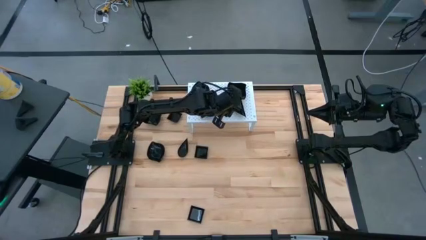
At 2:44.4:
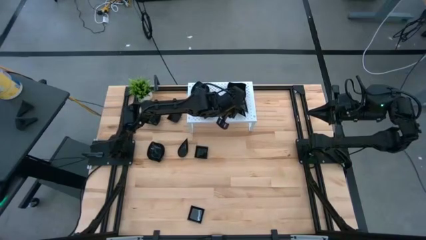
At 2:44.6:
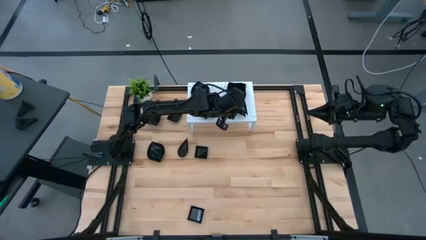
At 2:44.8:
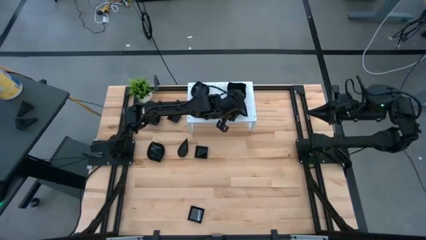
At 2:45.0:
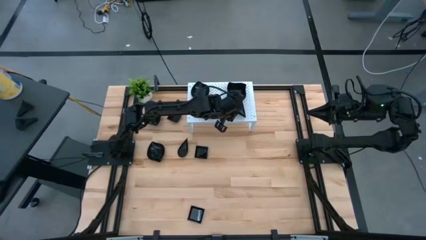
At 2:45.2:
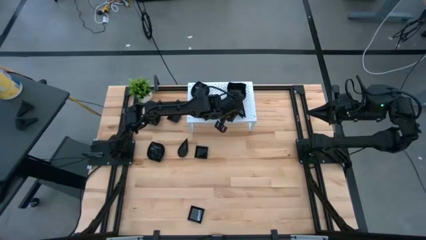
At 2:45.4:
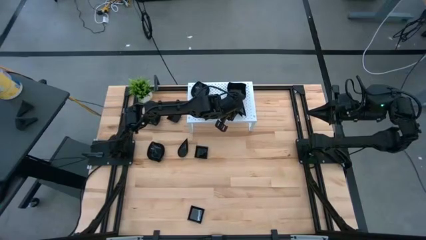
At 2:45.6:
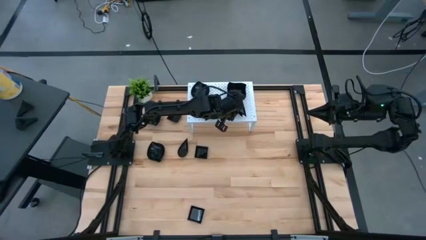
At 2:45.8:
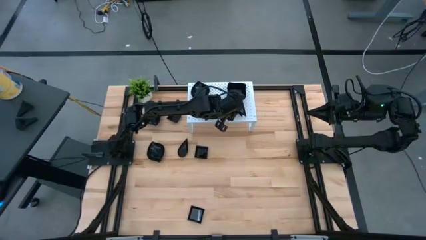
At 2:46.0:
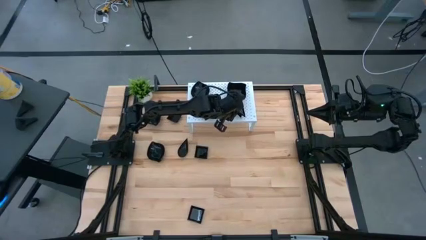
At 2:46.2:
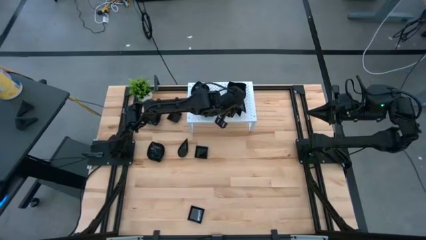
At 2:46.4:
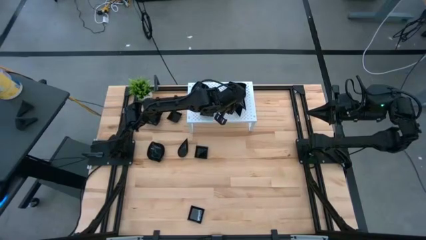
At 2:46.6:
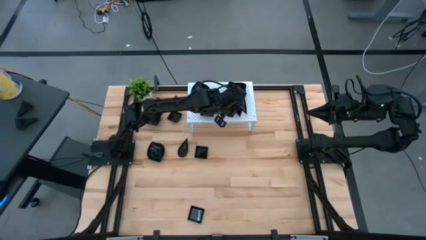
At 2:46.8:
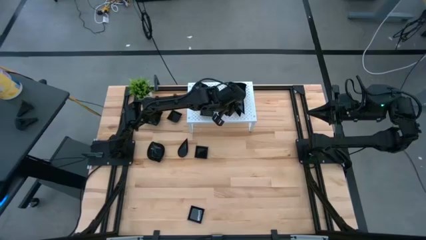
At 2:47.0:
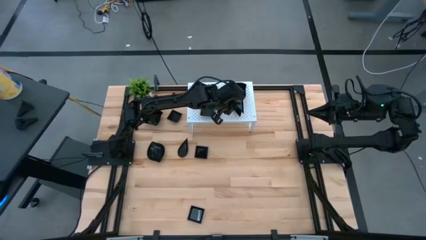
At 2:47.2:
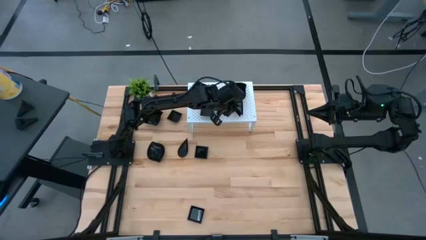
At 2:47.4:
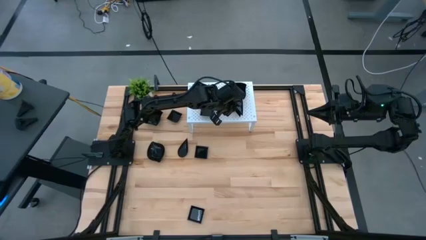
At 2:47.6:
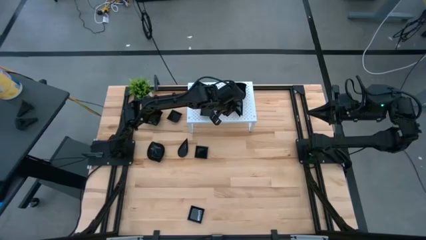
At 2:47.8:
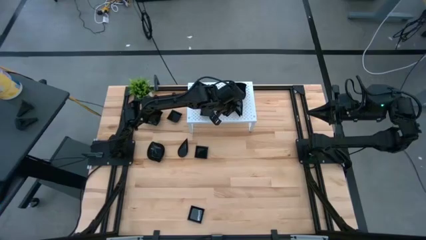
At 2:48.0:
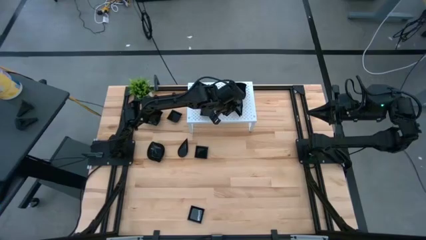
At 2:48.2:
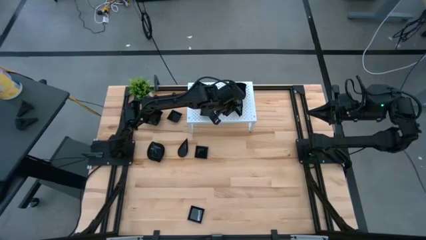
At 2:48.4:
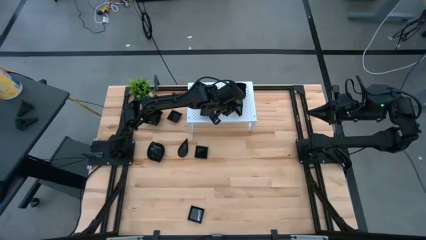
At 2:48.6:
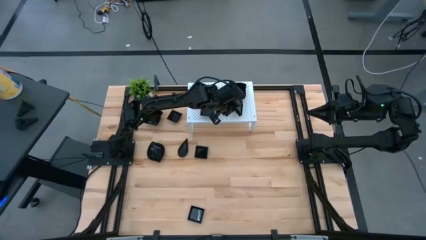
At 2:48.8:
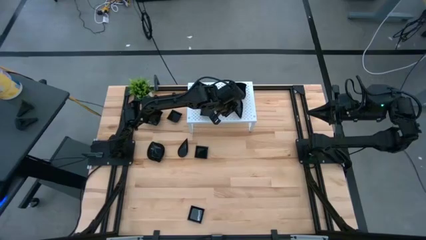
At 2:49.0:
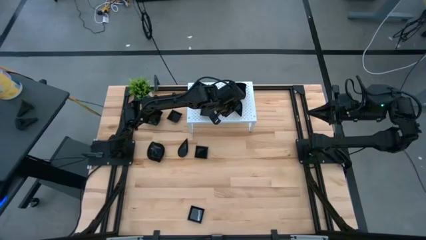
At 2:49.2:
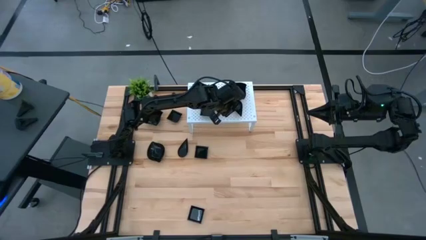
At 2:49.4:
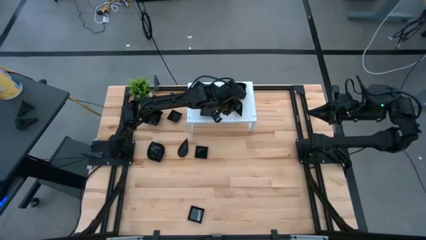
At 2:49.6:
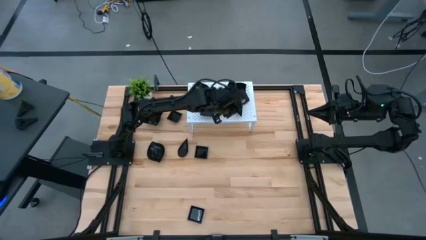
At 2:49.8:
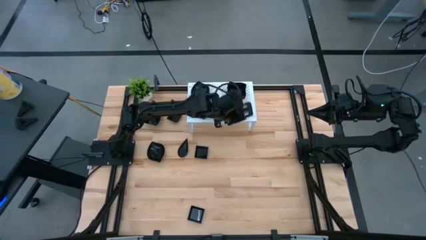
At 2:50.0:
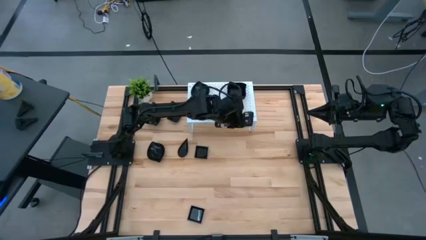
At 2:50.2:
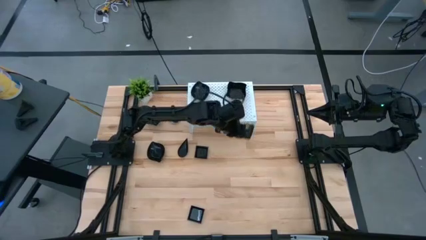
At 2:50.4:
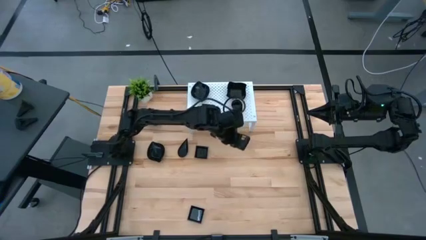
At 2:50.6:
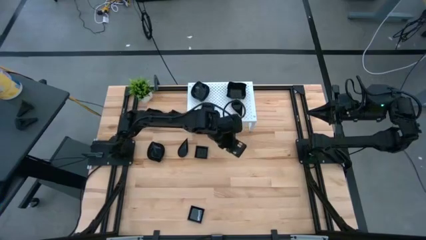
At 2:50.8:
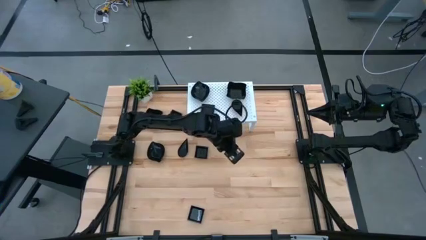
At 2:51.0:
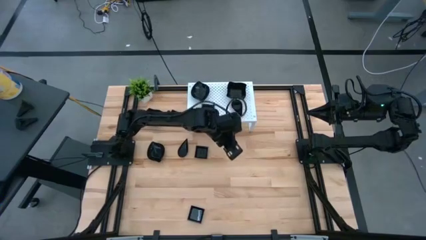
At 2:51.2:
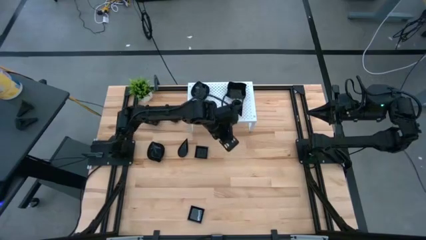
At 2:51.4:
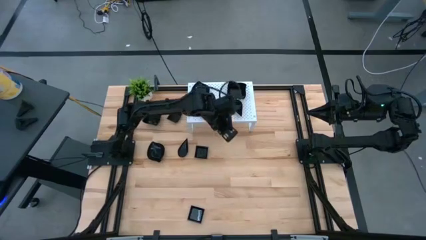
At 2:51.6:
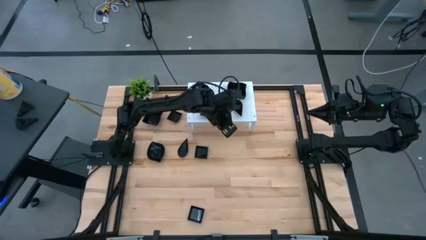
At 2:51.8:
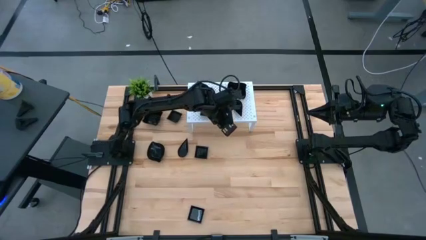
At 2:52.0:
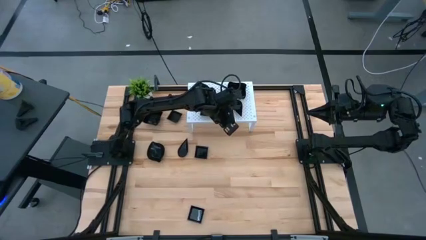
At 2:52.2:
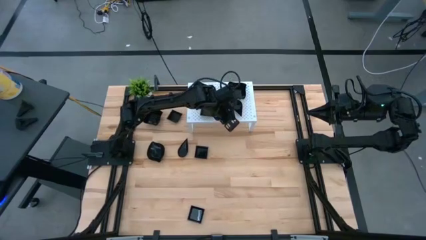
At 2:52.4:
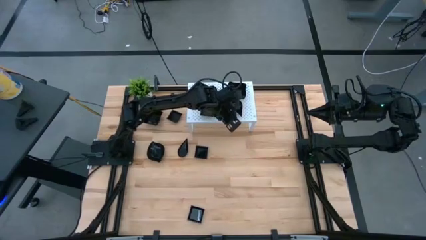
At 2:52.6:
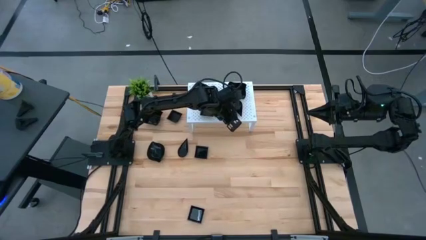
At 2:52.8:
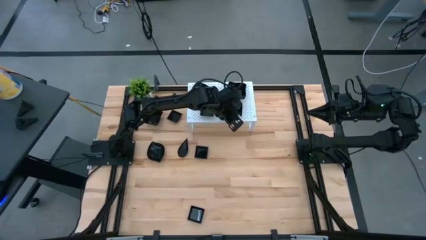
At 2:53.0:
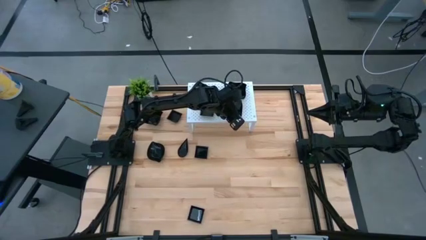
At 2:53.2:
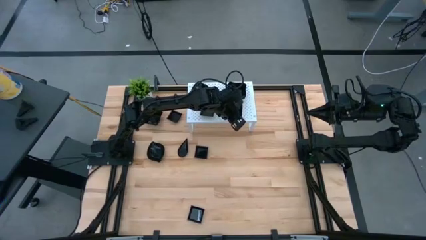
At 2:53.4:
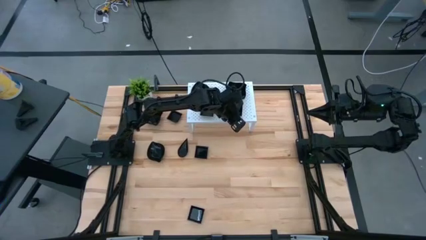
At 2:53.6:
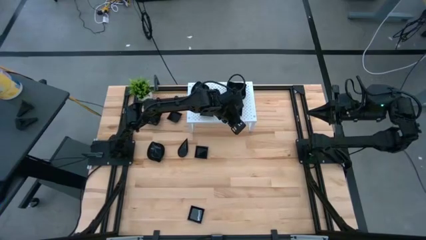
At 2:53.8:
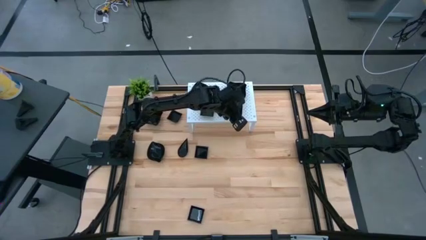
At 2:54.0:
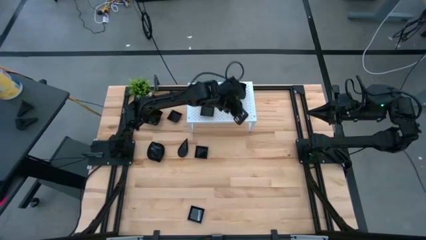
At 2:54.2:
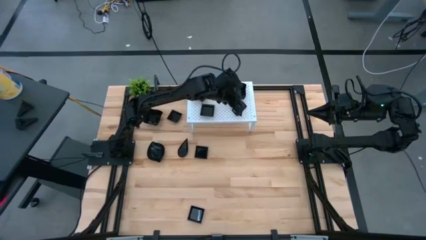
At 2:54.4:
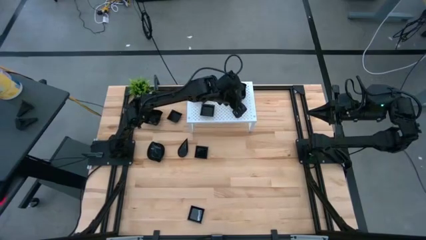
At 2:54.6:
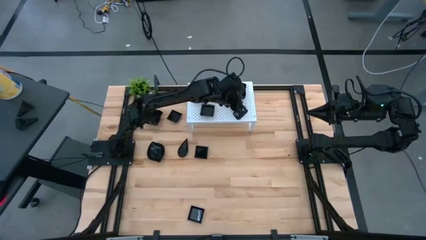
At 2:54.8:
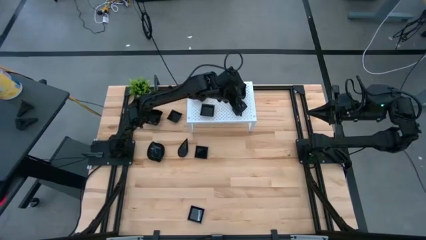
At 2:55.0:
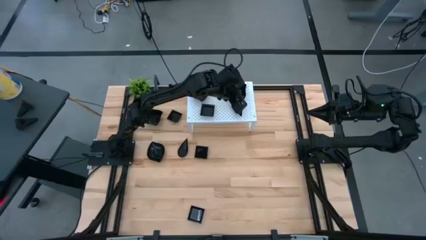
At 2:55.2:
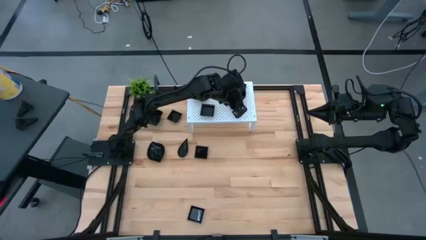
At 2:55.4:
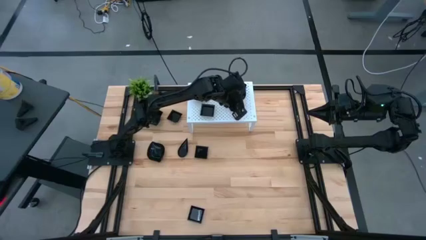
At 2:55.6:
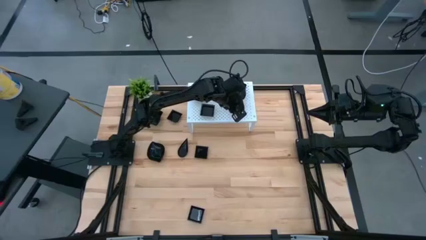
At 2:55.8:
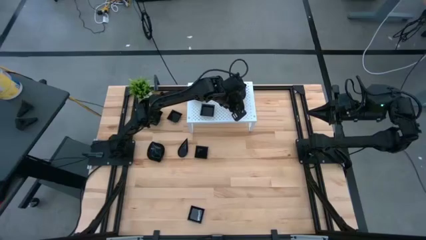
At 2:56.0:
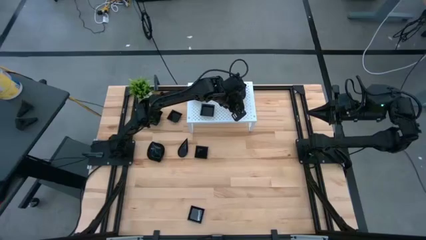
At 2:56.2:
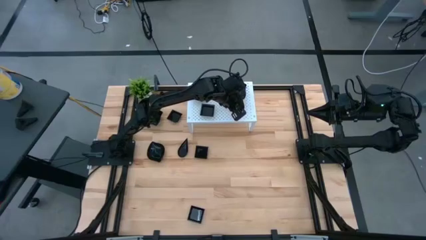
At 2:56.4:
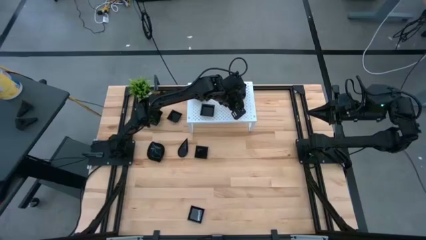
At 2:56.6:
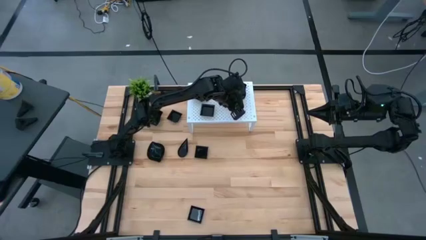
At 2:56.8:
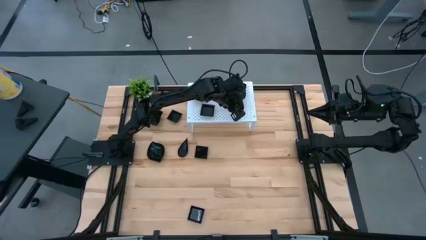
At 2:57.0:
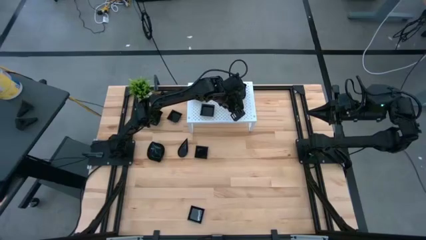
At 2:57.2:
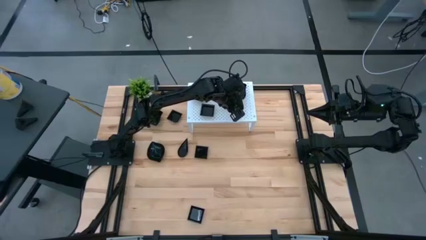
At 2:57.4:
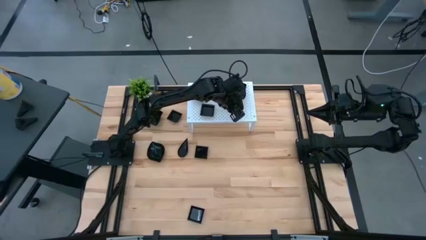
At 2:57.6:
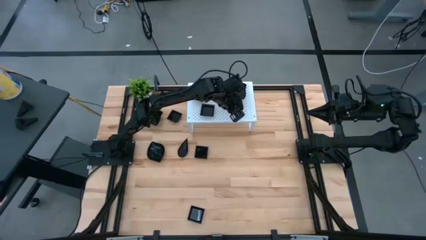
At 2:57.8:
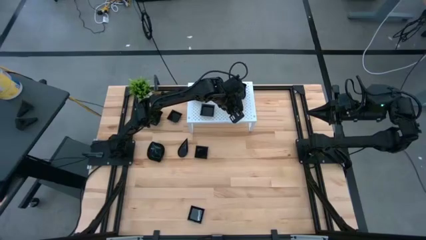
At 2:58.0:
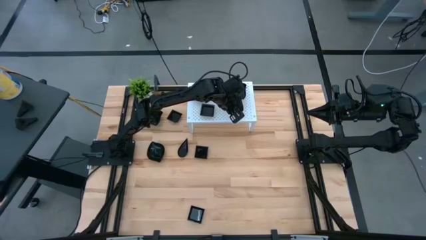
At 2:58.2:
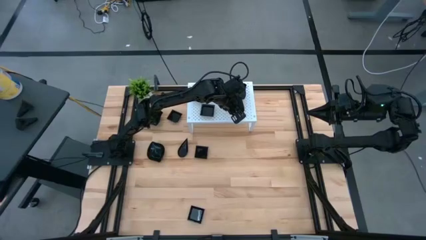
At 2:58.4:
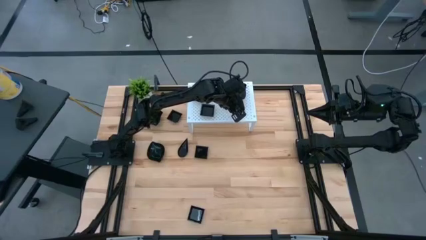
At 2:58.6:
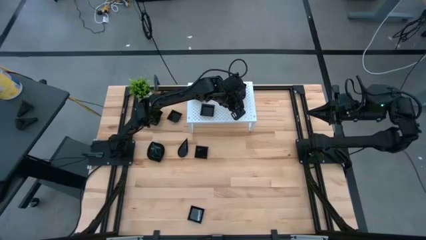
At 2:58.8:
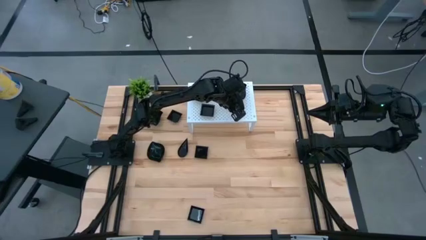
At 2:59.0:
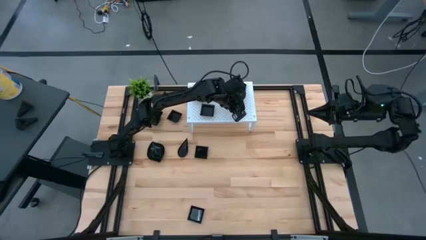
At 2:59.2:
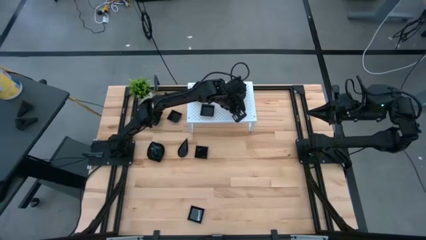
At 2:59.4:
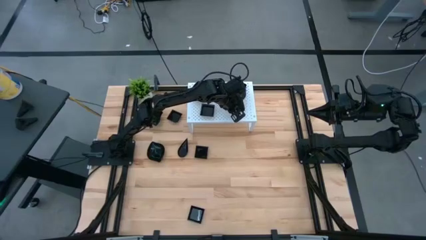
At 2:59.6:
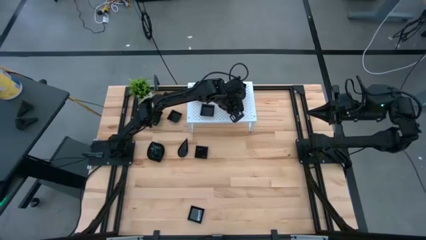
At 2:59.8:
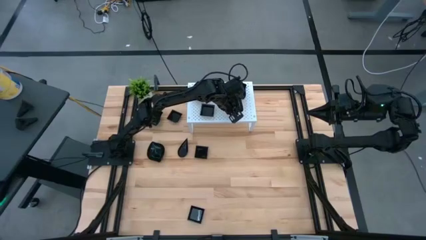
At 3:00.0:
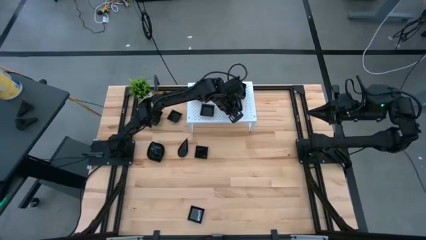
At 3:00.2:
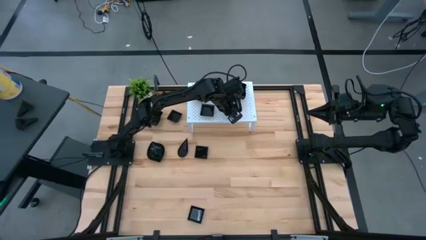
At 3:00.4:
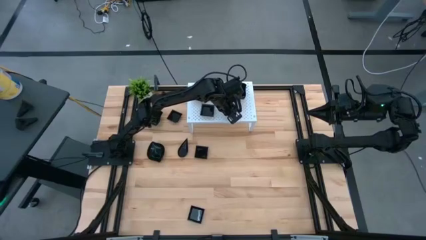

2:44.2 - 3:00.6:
Task: Pick & Place Mini shaped plates
Stack the drop-shaped plate on top of the drop-shaped plate on the shelf
